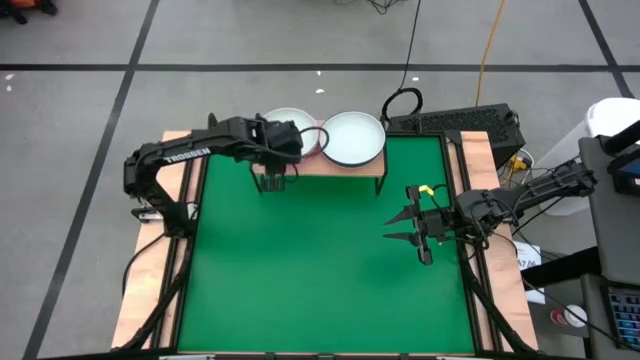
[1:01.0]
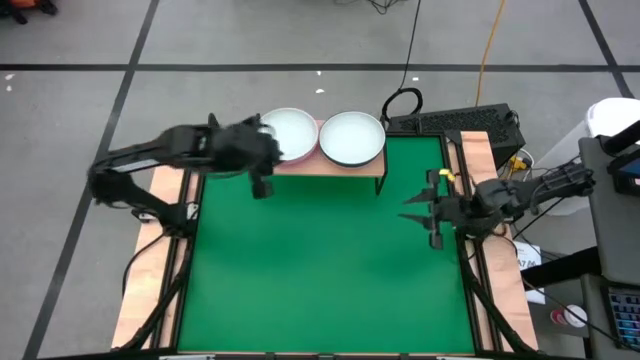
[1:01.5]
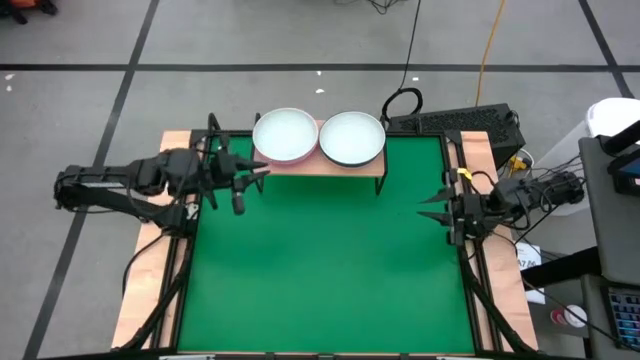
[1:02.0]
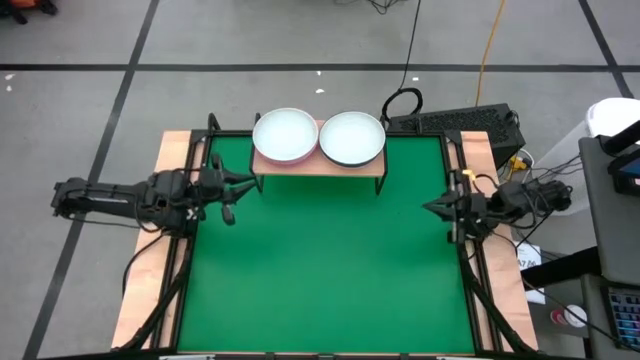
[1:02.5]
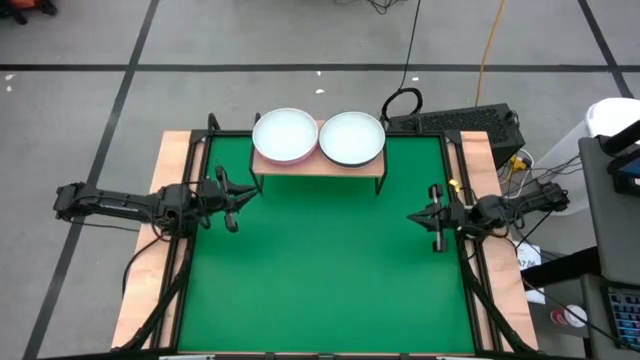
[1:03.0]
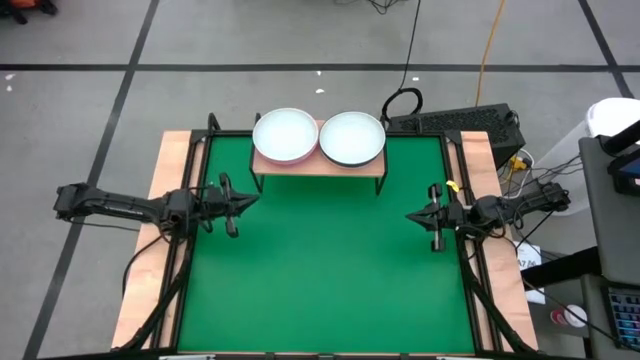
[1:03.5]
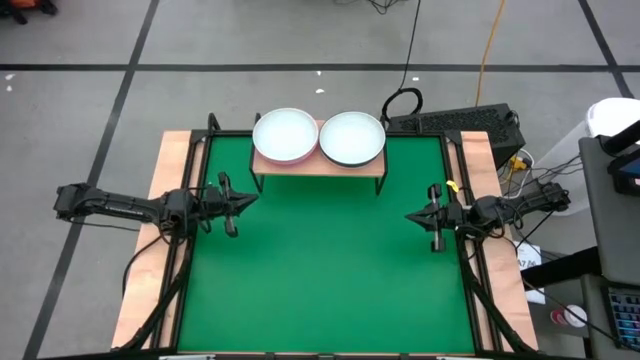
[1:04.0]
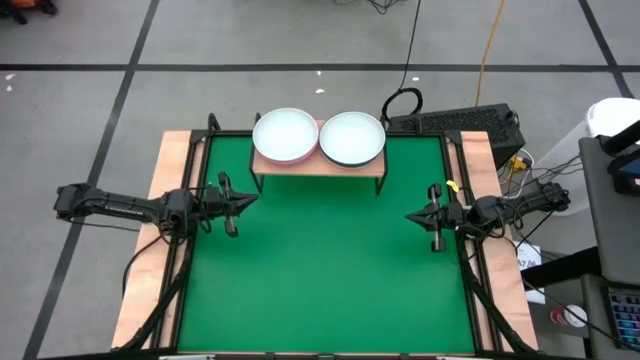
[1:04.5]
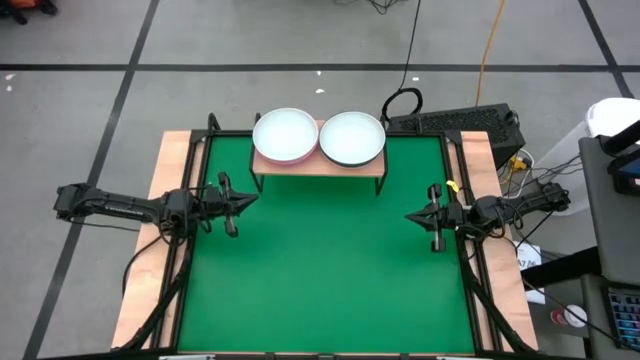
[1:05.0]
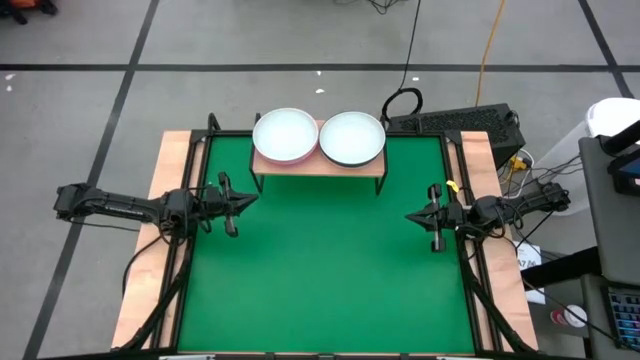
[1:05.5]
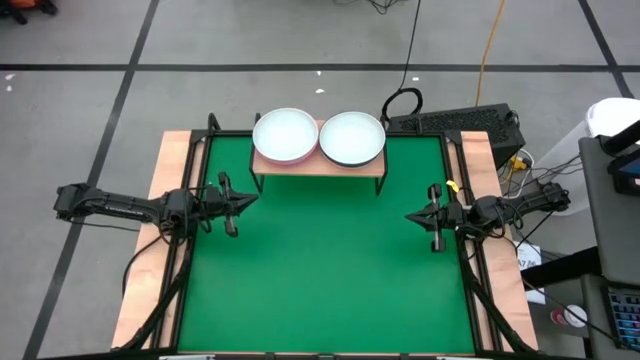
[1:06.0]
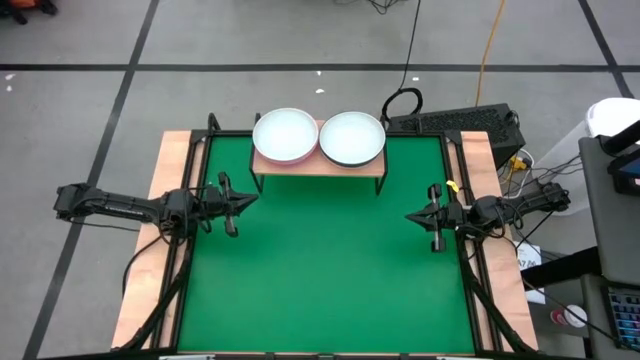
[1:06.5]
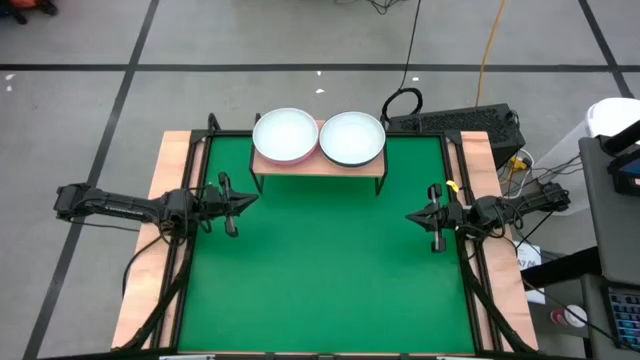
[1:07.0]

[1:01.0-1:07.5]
Task: Place and stack plates onto a shelf
Return to Home Position

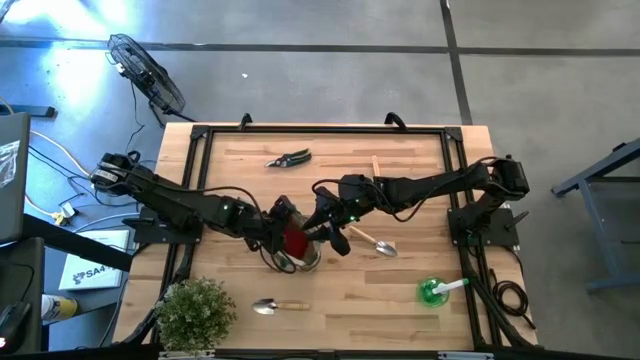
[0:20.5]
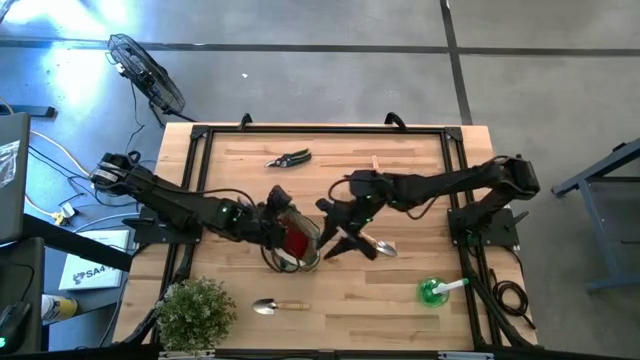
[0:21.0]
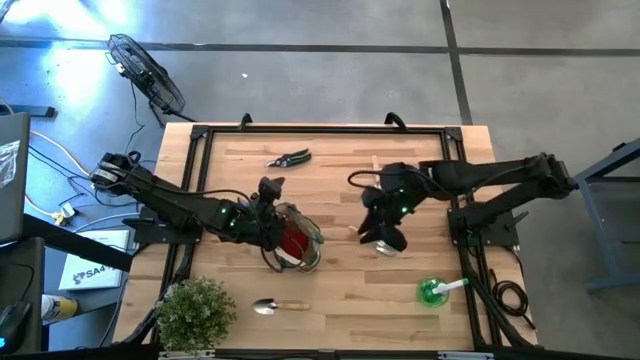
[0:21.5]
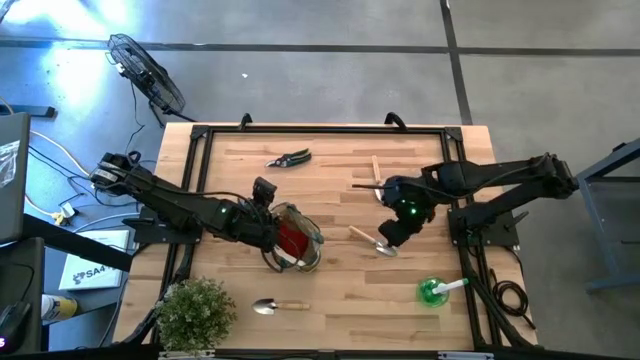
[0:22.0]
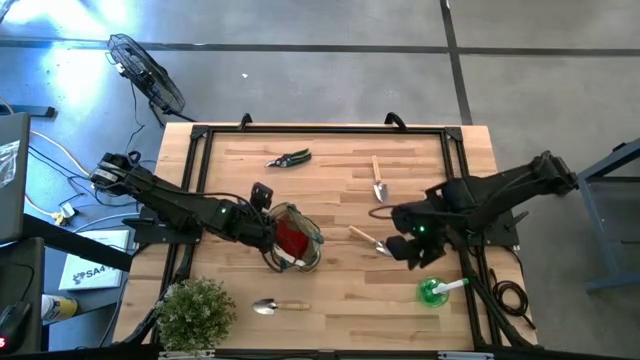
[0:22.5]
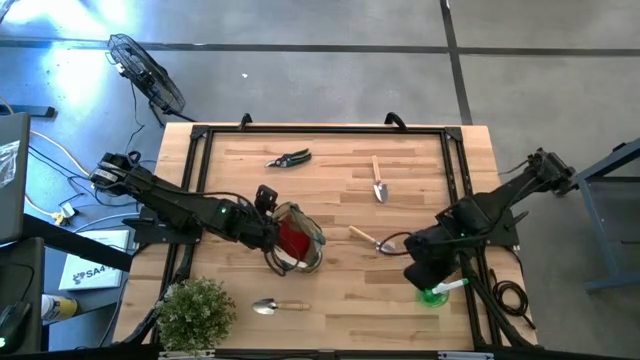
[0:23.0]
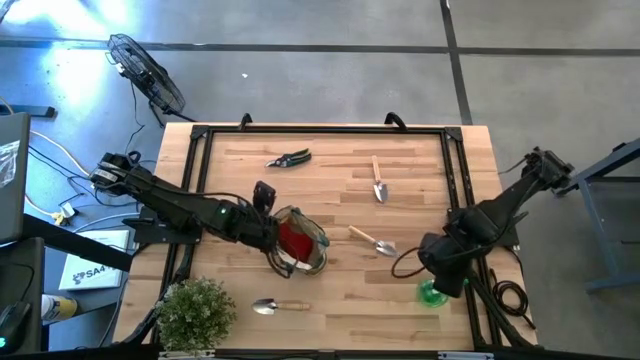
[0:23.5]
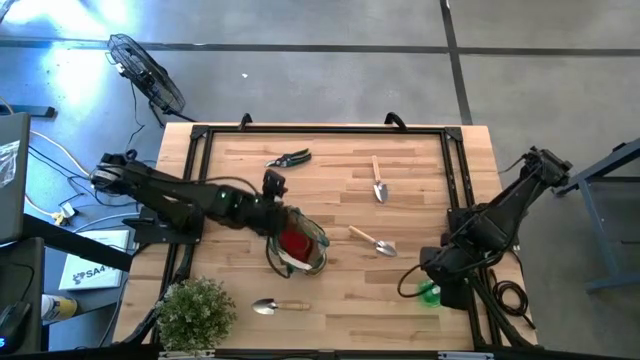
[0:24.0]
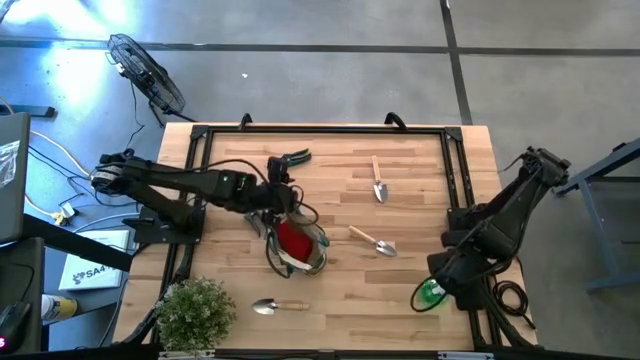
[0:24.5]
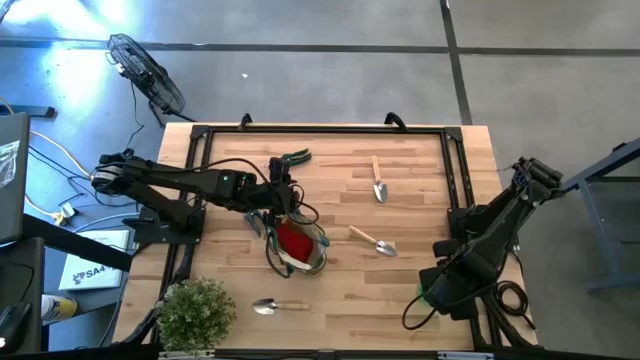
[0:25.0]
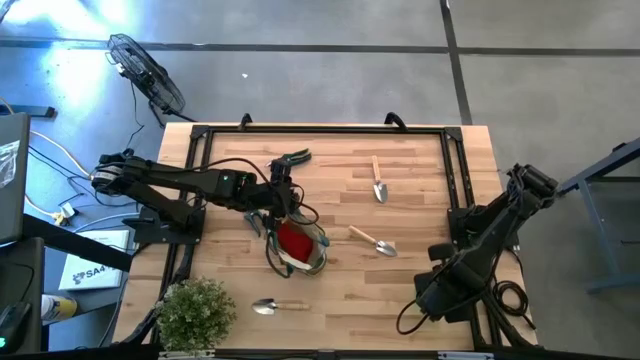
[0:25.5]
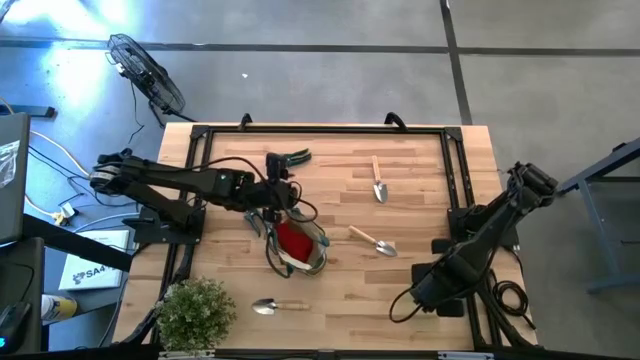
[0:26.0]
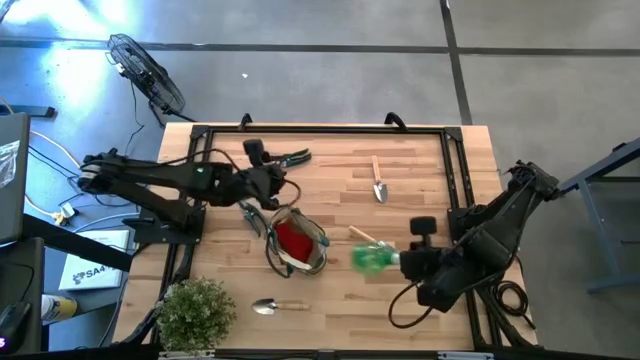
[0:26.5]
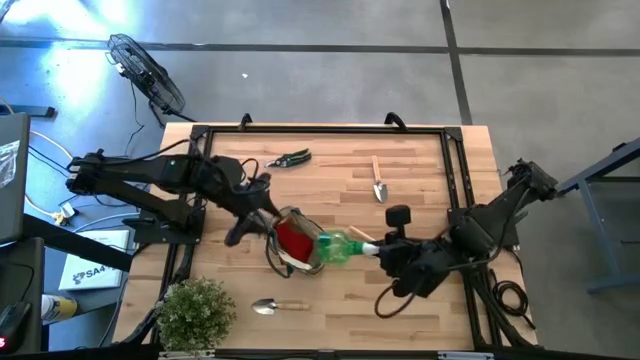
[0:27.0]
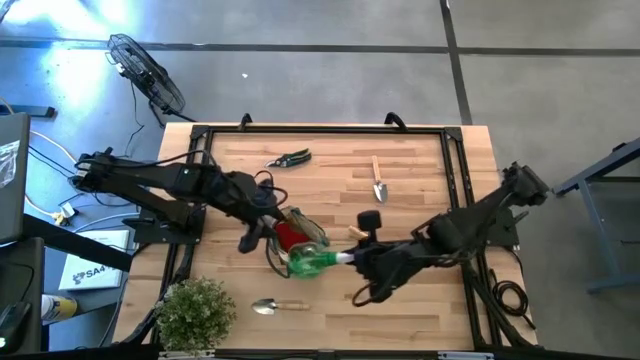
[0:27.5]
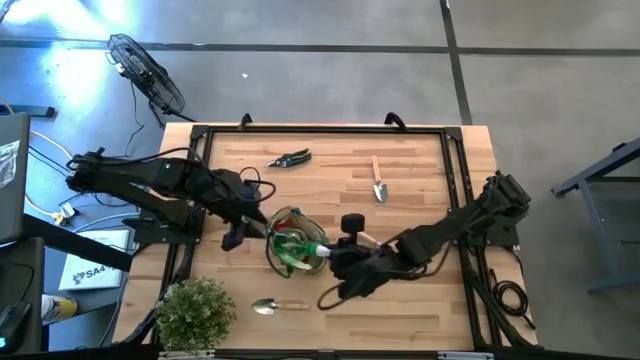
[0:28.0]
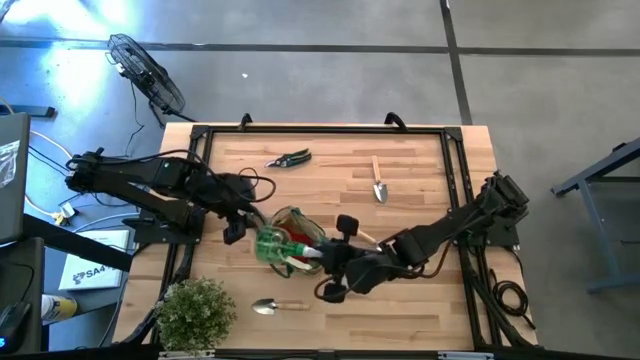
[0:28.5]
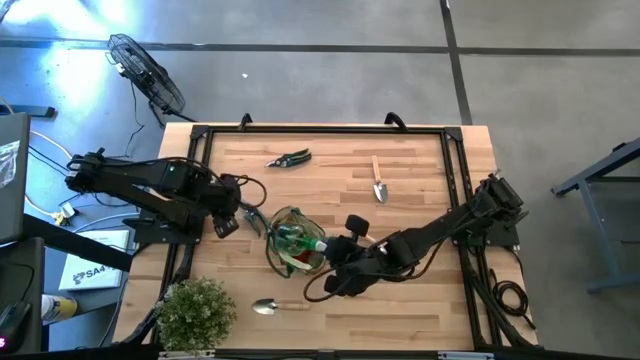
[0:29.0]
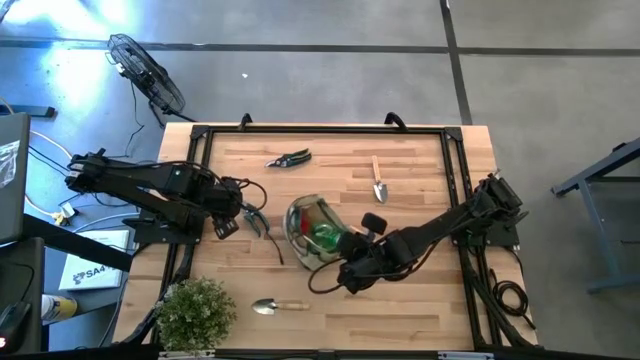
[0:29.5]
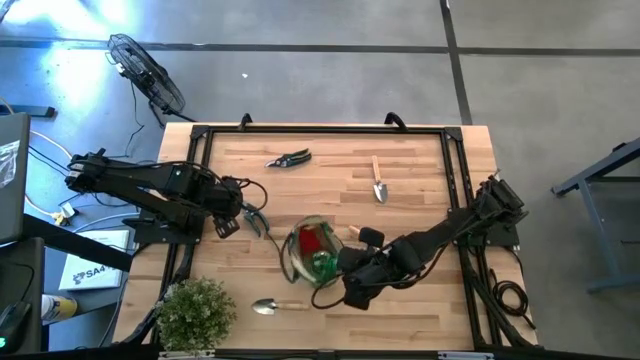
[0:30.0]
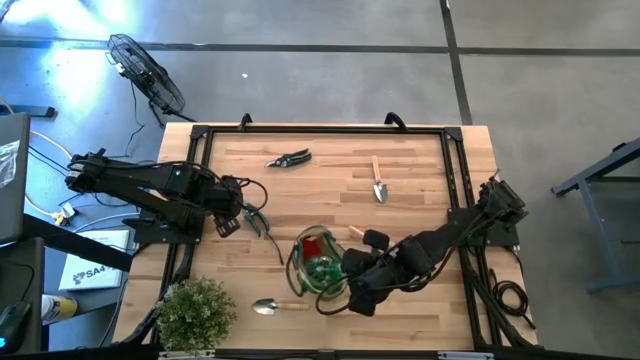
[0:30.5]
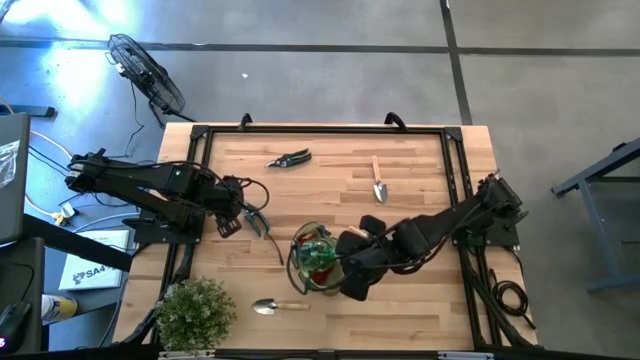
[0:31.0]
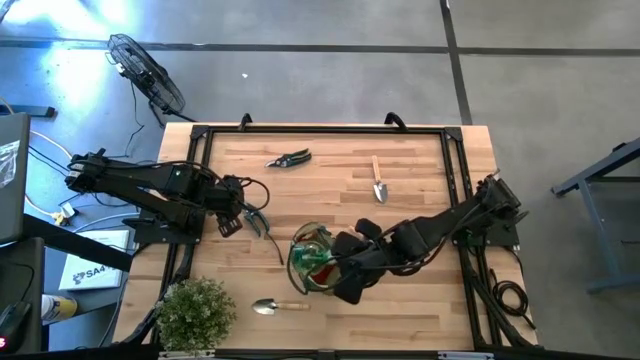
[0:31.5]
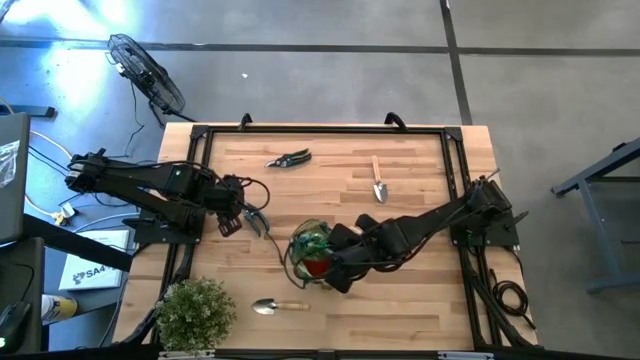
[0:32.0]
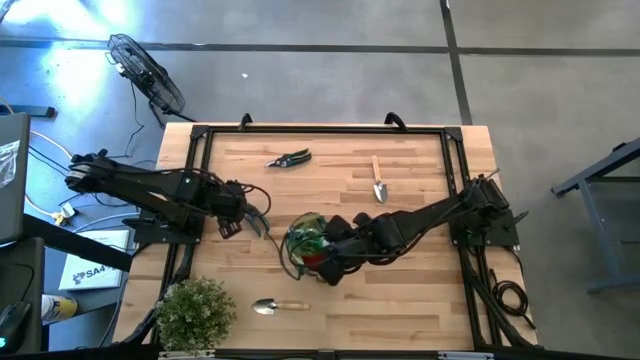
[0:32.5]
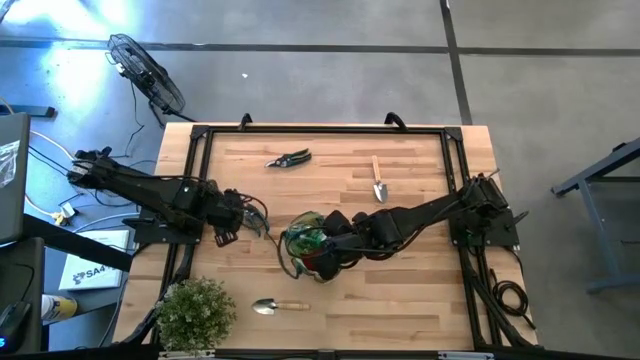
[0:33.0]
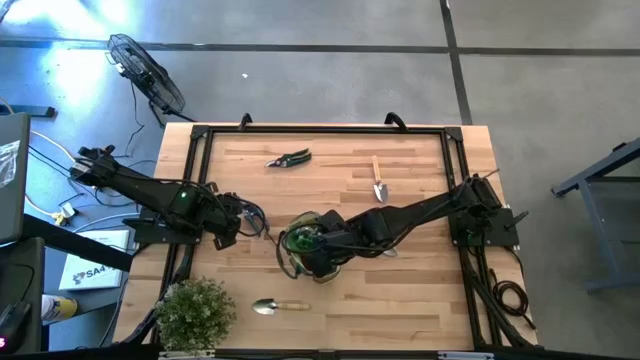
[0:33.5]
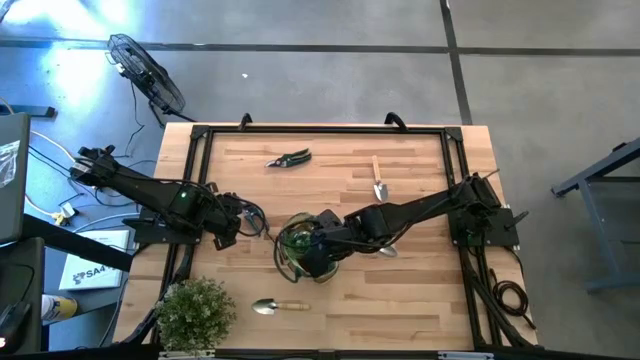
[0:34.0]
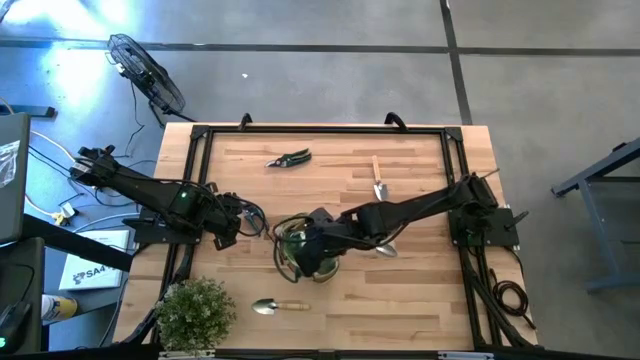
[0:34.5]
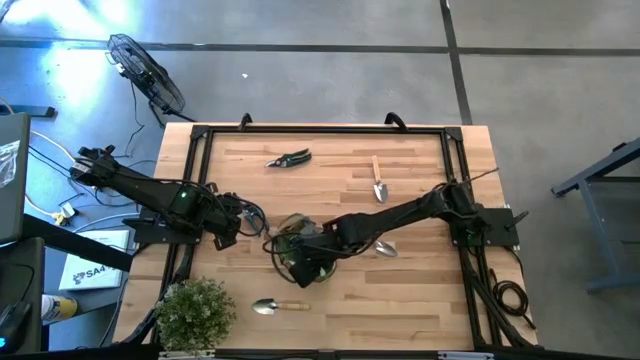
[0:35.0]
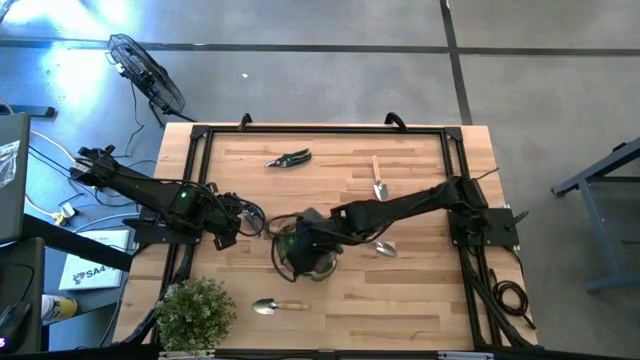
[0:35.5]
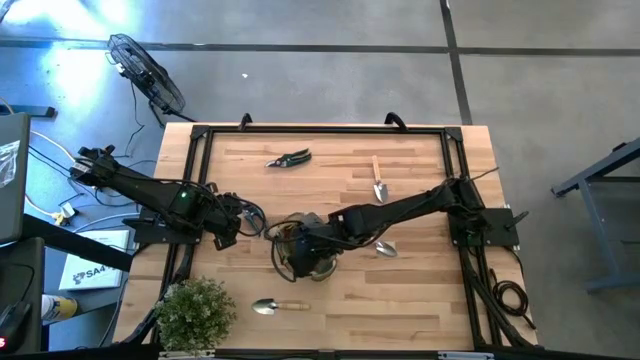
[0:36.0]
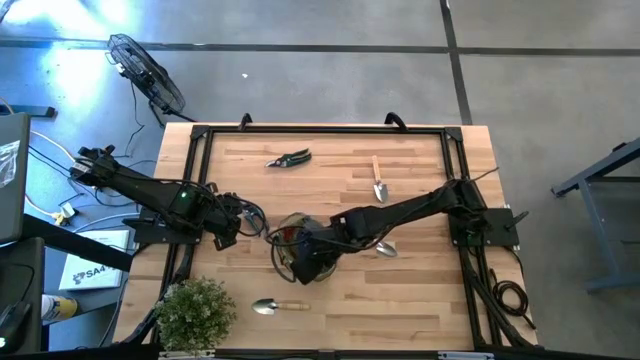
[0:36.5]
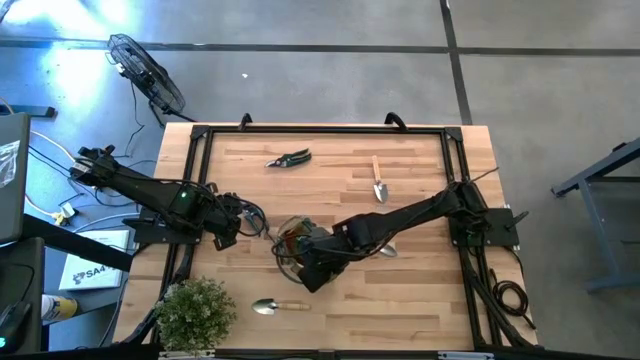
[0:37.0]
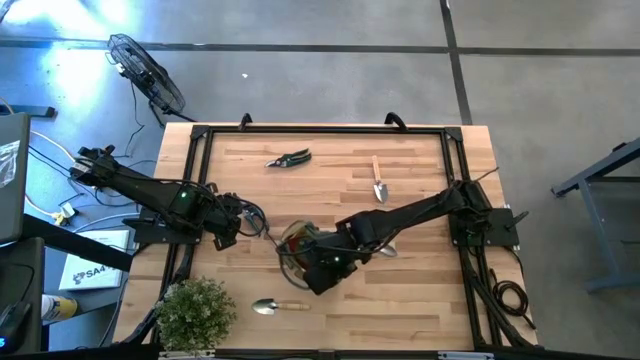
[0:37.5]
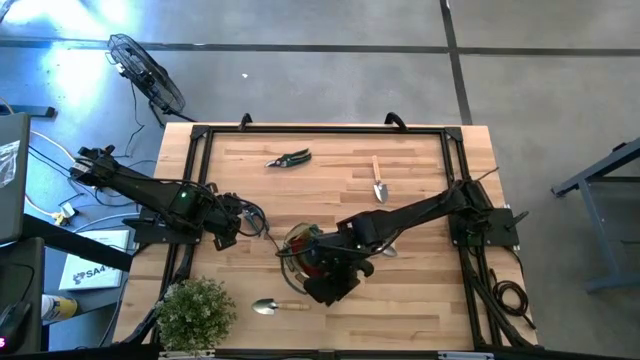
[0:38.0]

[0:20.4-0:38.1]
Task: Pick & Place Garden tools in Gardening bag
Put the spray bottle into the gardening bag
